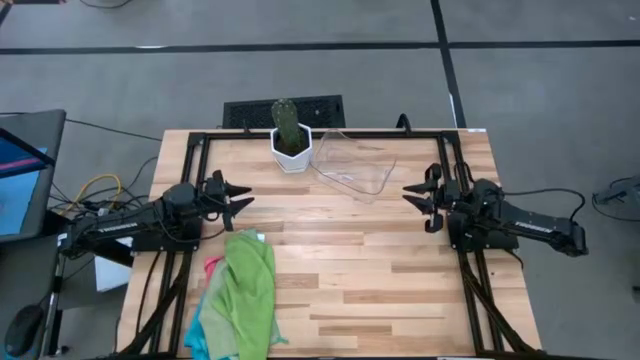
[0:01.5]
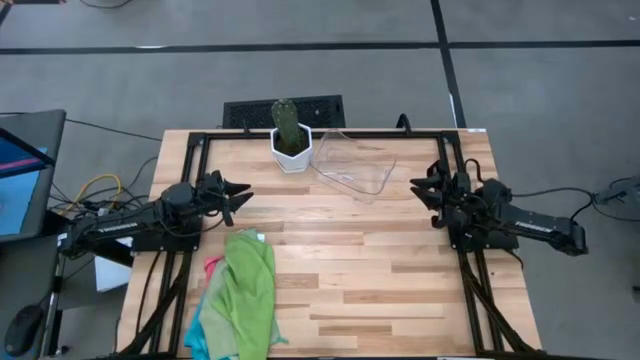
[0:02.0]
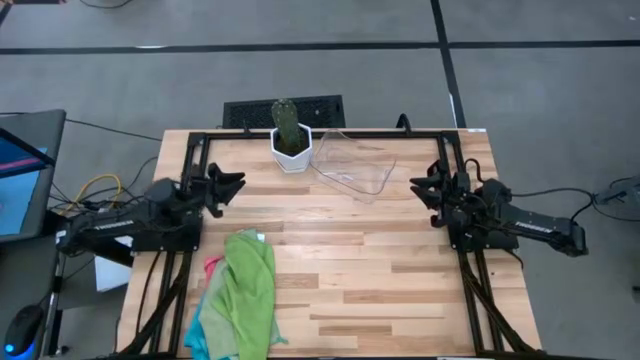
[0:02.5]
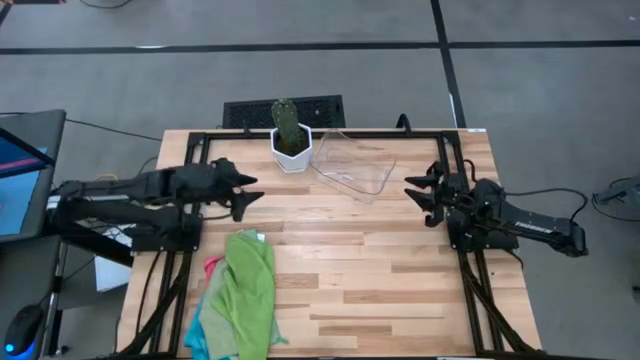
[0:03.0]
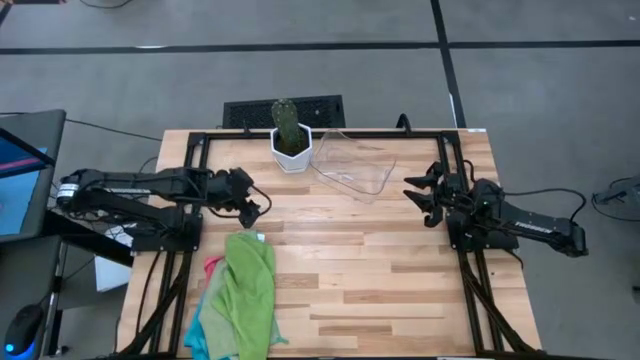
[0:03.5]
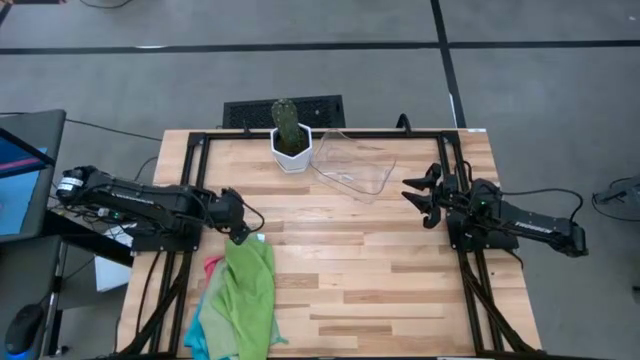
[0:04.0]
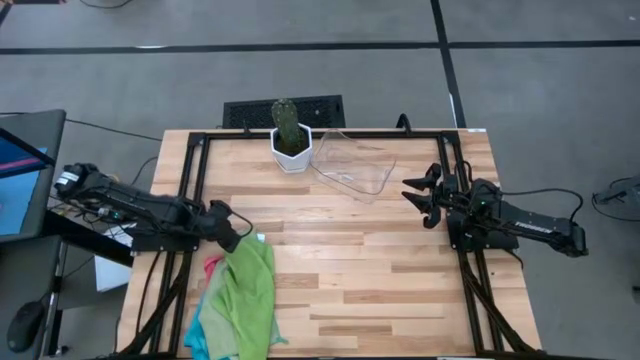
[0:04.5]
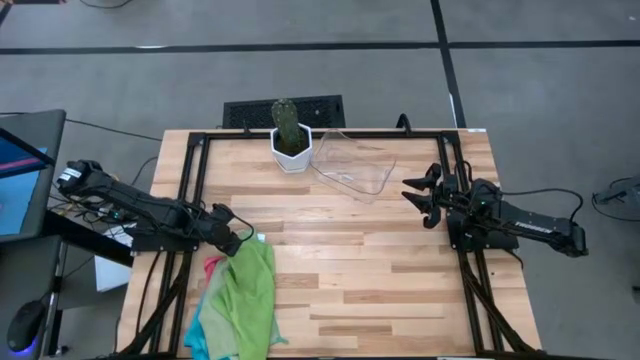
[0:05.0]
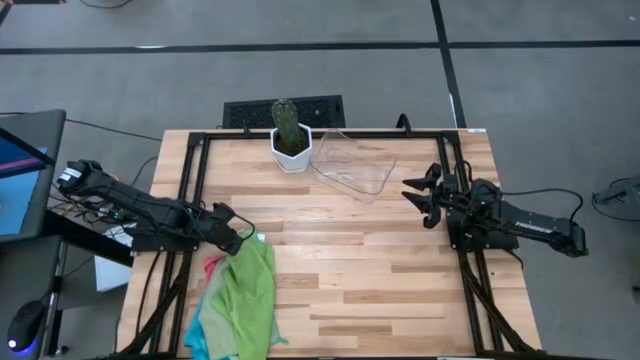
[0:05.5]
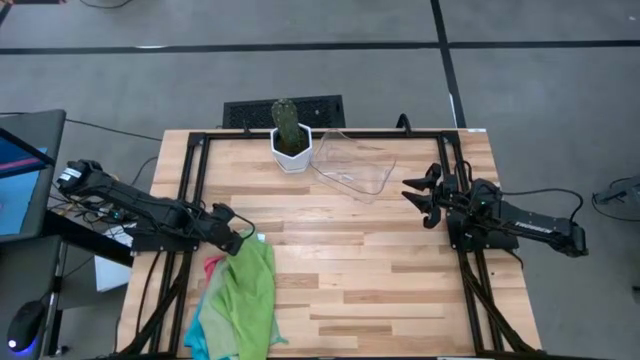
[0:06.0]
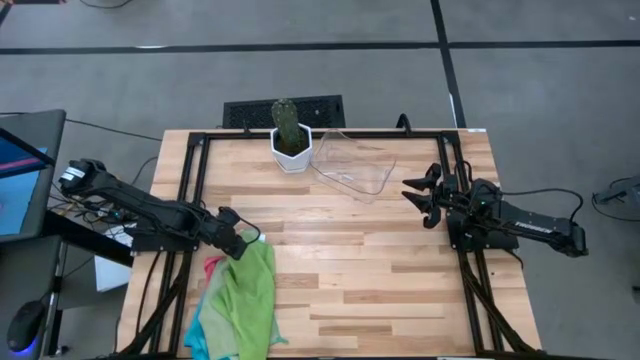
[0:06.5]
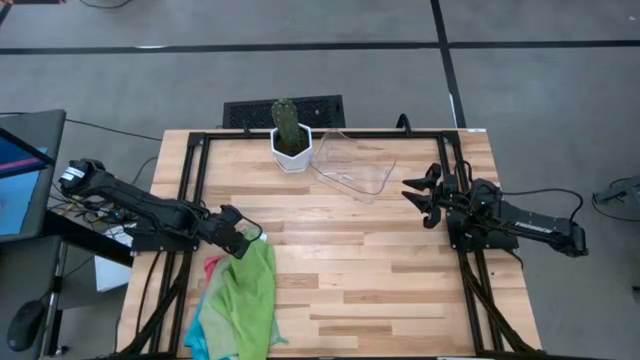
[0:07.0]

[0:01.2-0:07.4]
Task: Fold microfiber towels
Fold the green towel

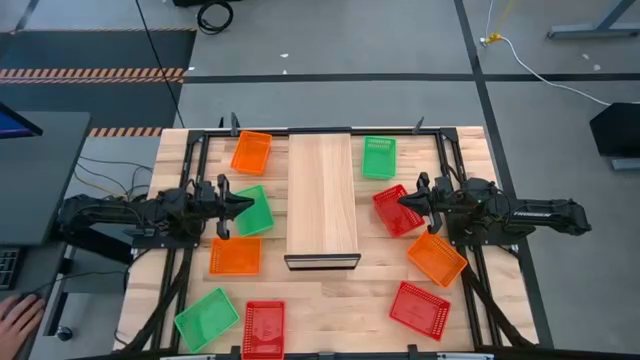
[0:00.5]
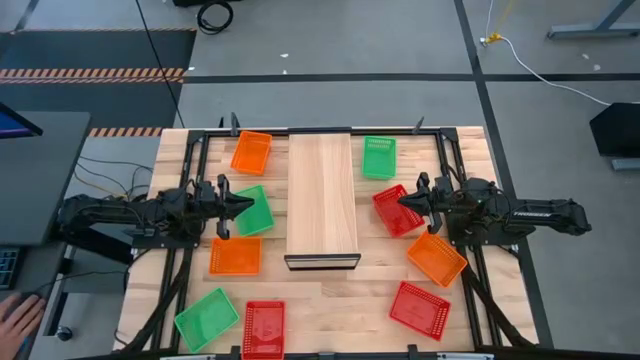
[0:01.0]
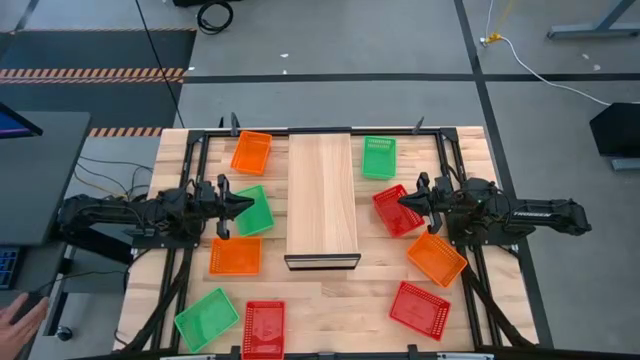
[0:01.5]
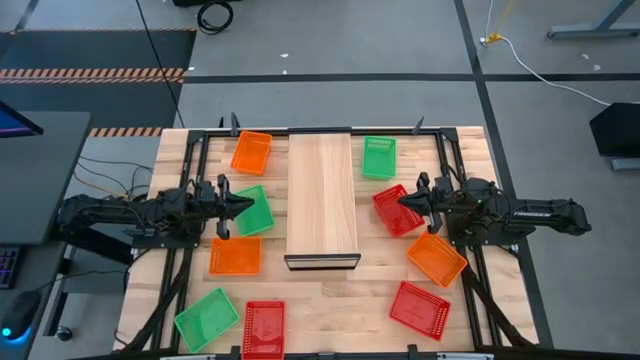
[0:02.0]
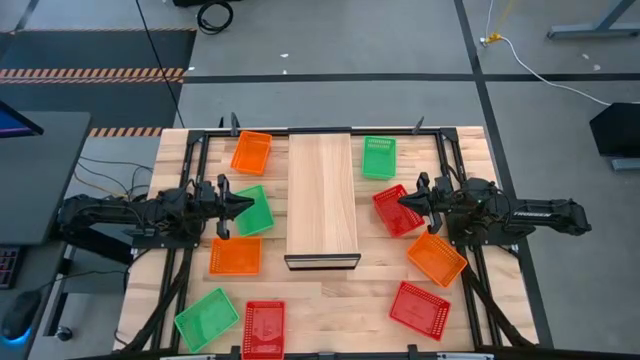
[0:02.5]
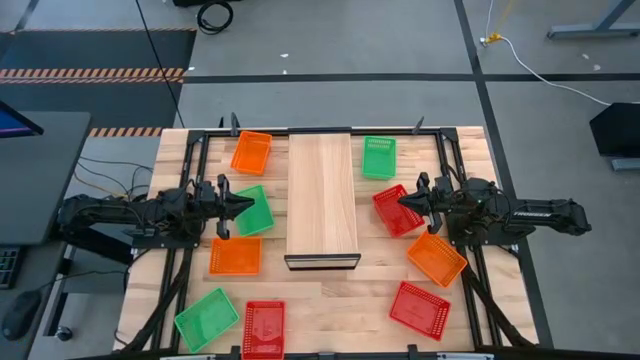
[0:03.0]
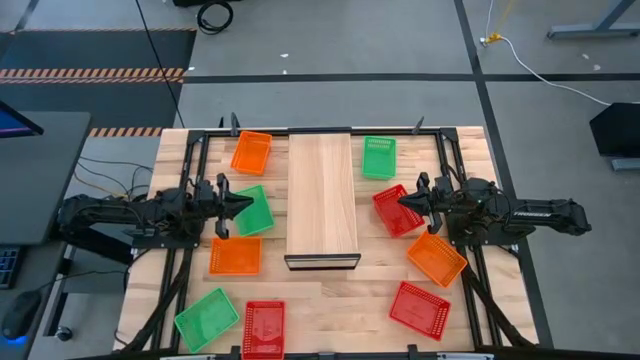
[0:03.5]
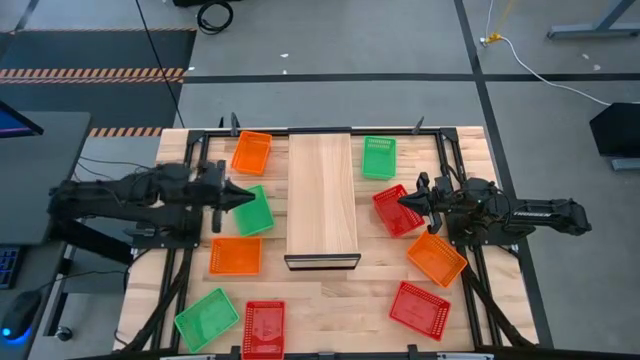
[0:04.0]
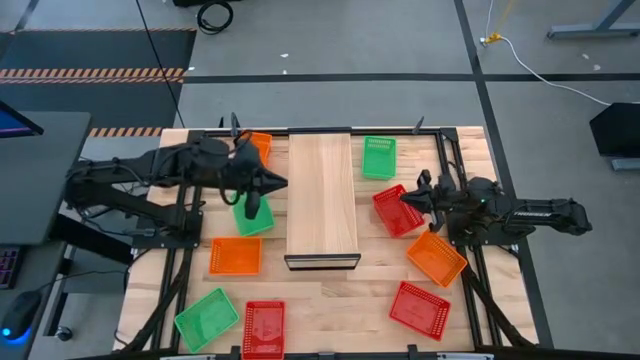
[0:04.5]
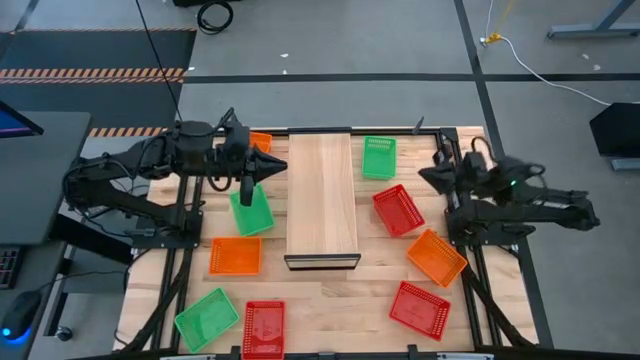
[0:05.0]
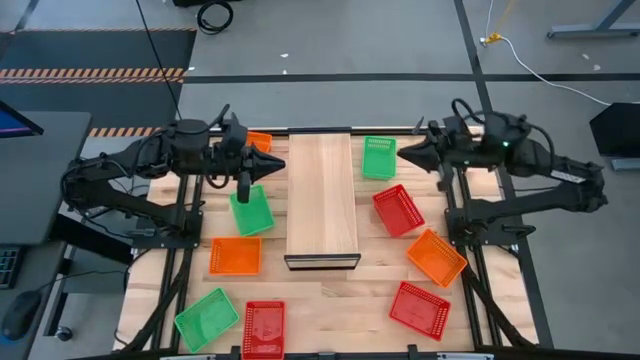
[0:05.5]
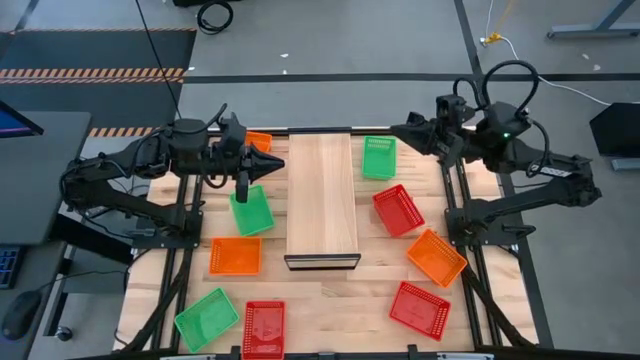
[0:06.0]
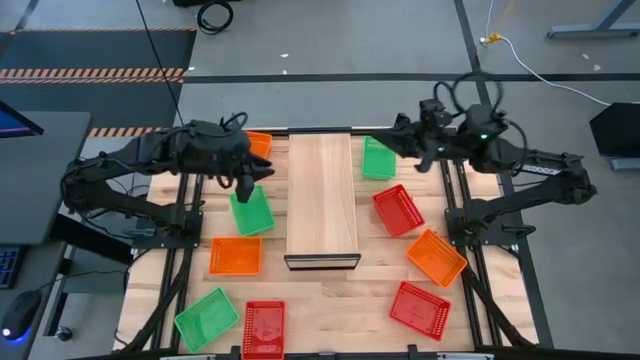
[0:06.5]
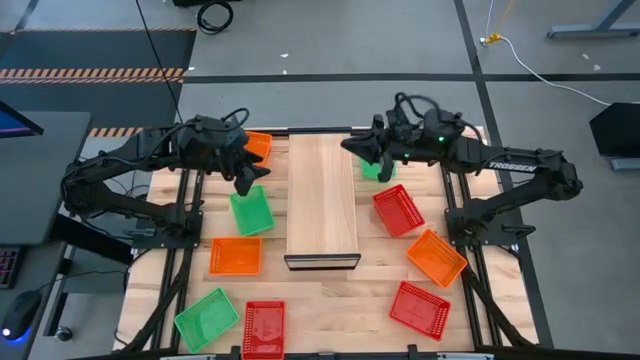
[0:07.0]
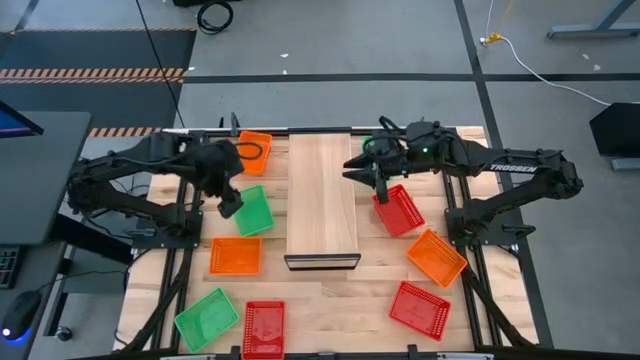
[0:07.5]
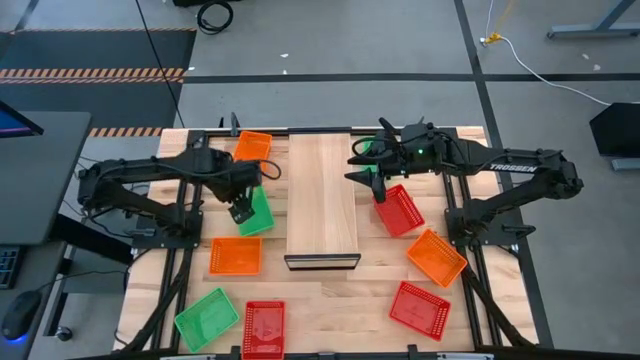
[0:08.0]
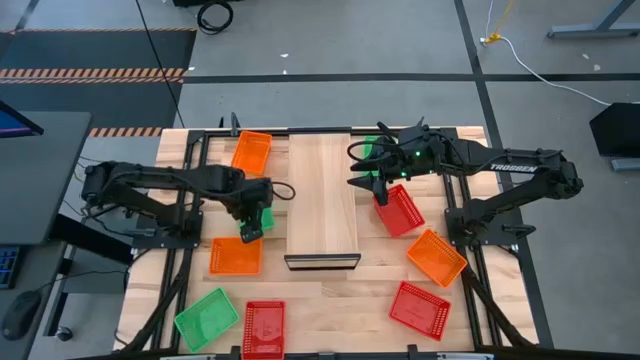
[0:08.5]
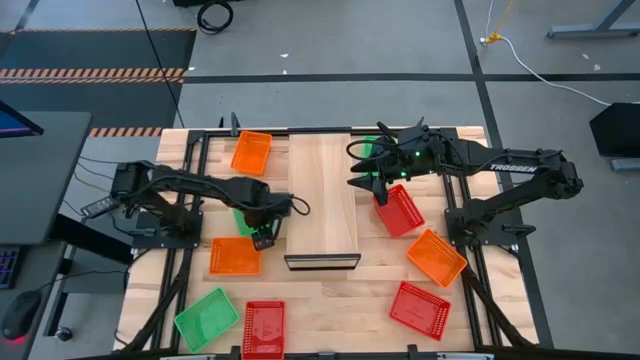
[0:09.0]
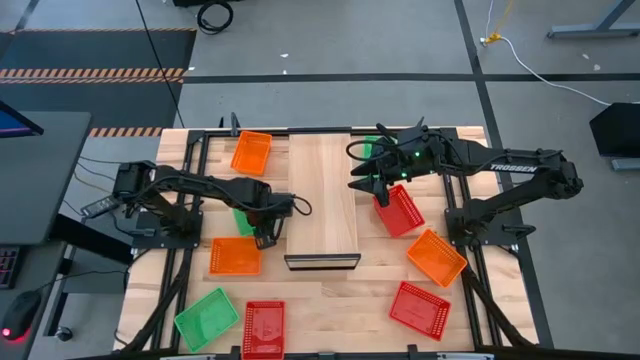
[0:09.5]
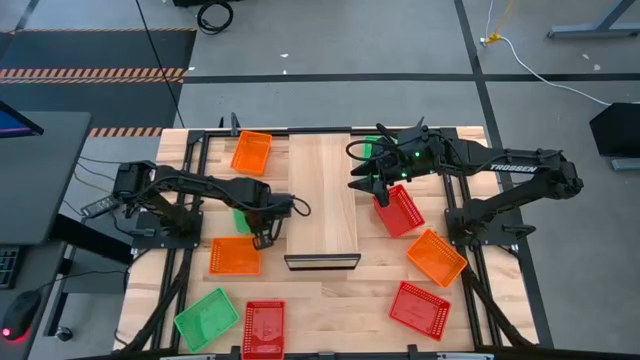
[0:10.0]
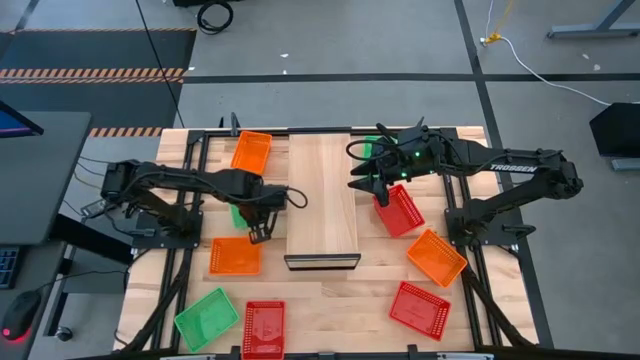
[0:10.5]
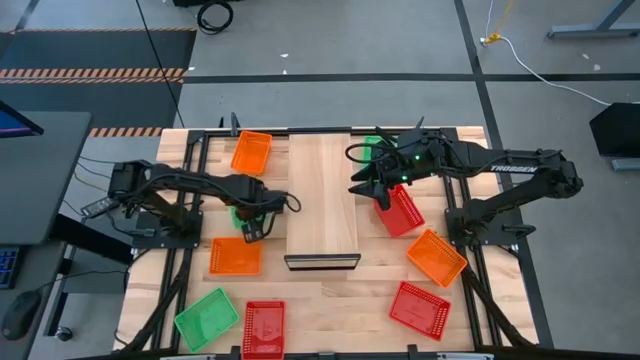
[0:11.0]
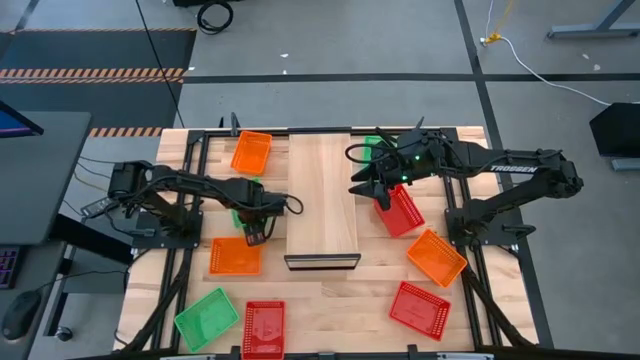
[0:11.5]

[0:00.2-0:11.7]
Task: Stack baskets on shelf by color
Put the top left green bin on the shelf
